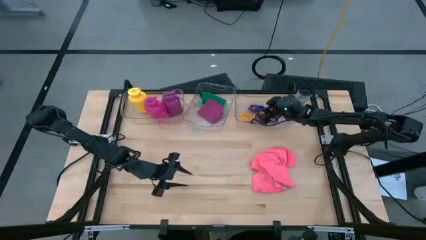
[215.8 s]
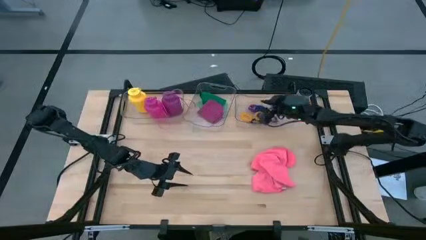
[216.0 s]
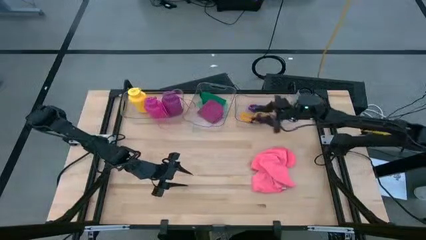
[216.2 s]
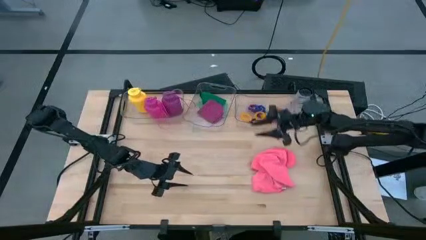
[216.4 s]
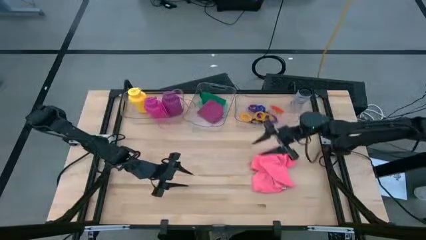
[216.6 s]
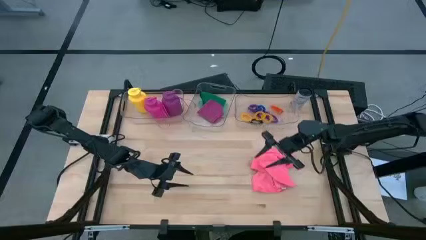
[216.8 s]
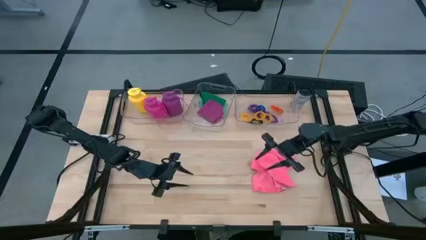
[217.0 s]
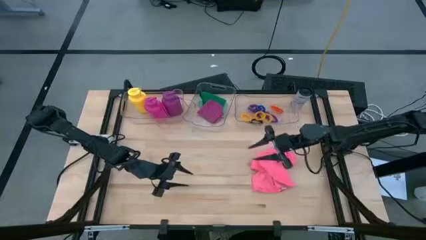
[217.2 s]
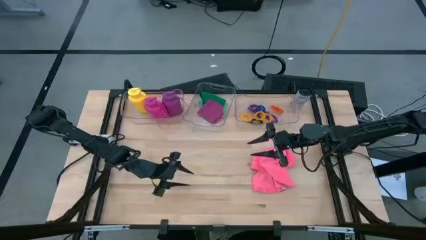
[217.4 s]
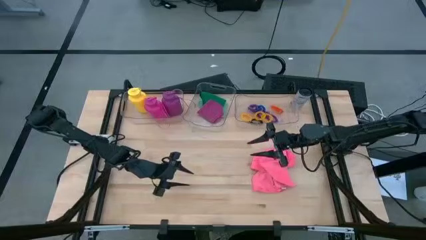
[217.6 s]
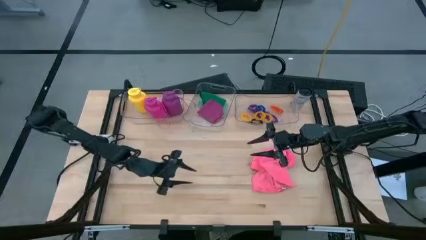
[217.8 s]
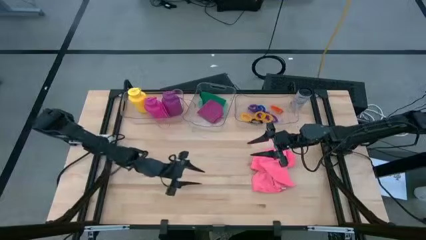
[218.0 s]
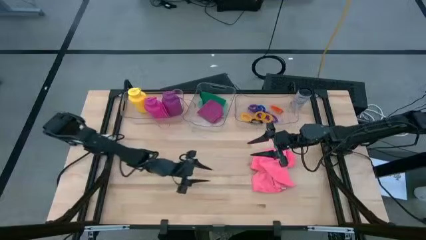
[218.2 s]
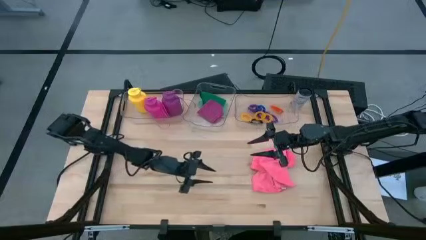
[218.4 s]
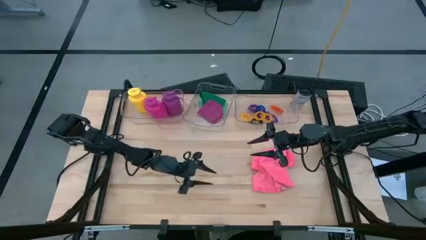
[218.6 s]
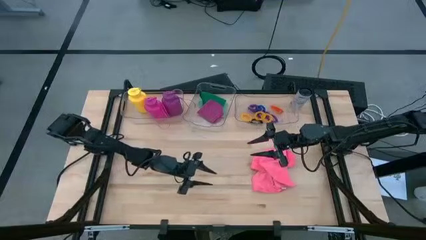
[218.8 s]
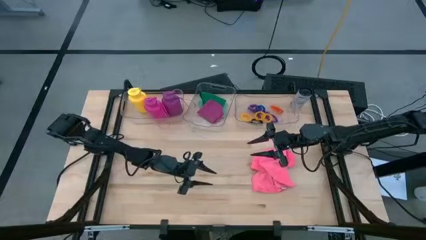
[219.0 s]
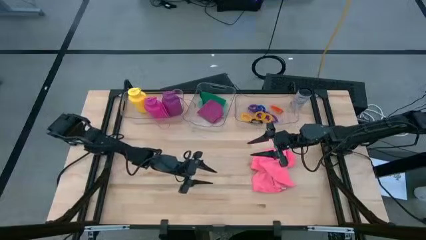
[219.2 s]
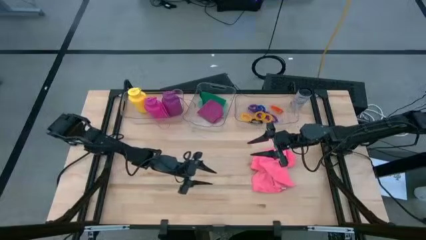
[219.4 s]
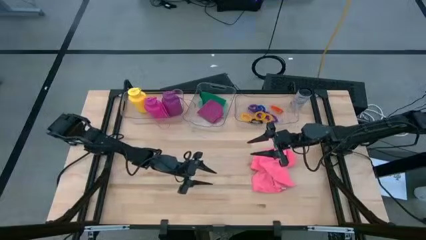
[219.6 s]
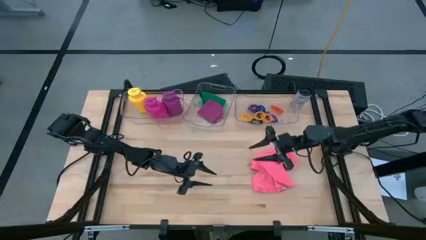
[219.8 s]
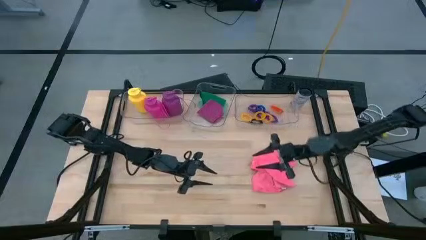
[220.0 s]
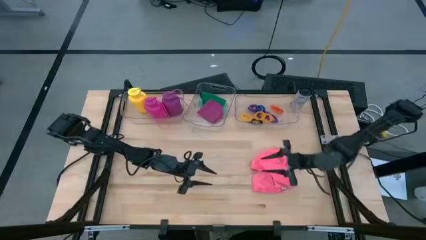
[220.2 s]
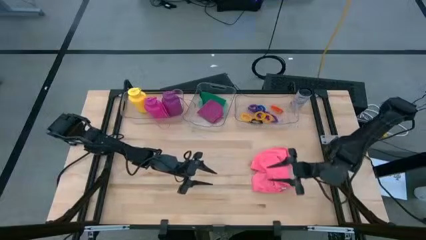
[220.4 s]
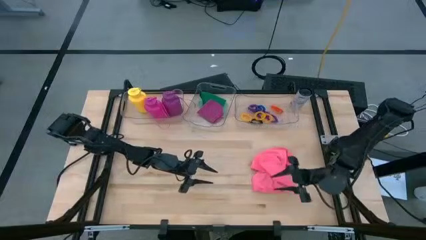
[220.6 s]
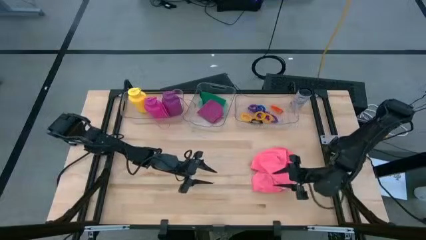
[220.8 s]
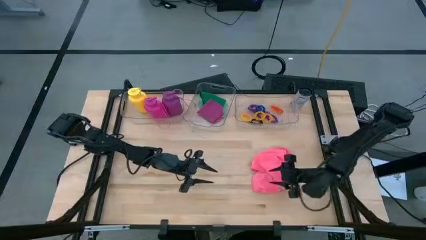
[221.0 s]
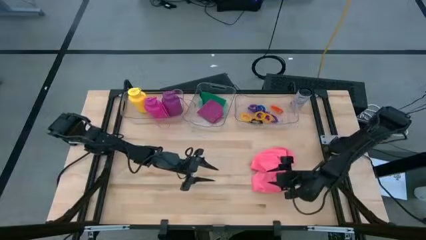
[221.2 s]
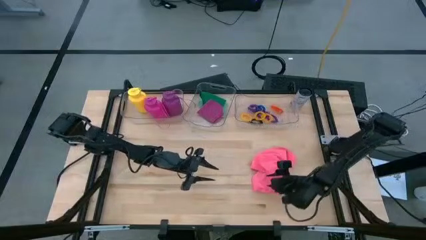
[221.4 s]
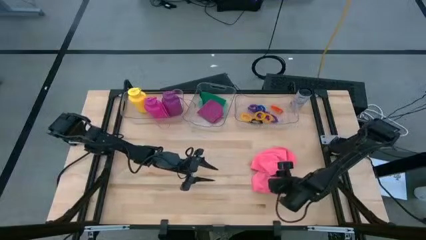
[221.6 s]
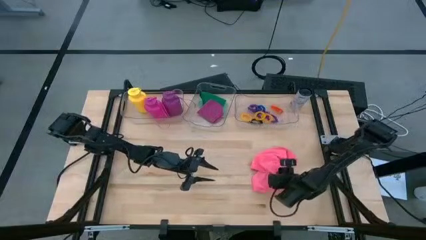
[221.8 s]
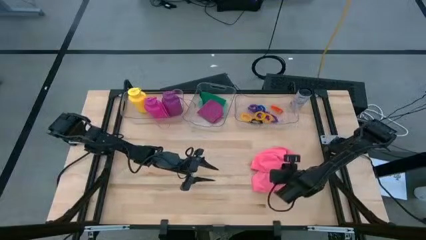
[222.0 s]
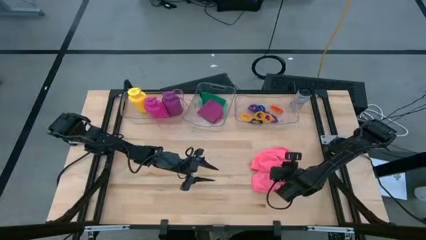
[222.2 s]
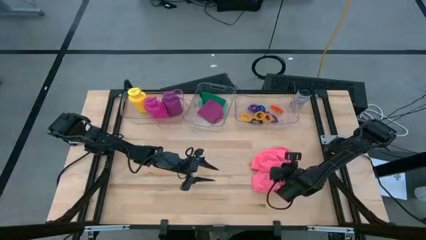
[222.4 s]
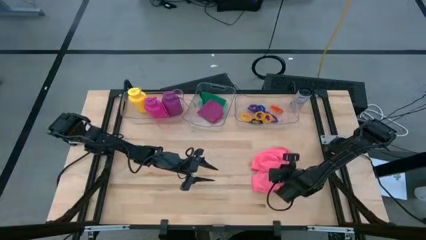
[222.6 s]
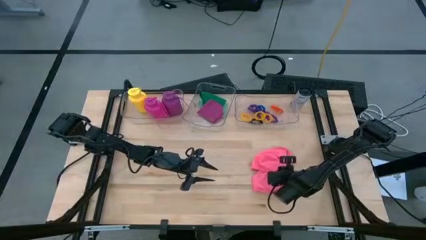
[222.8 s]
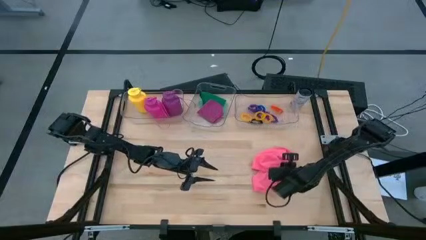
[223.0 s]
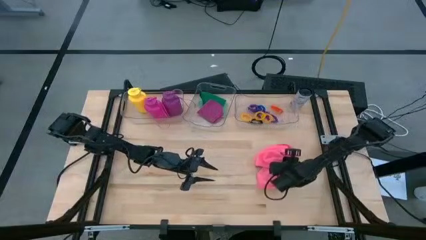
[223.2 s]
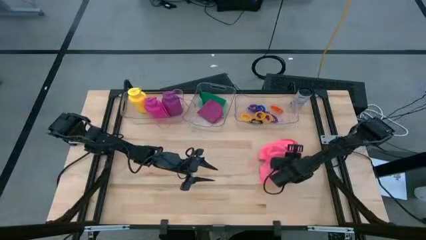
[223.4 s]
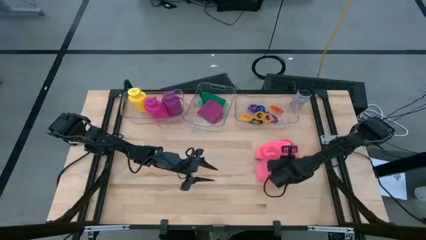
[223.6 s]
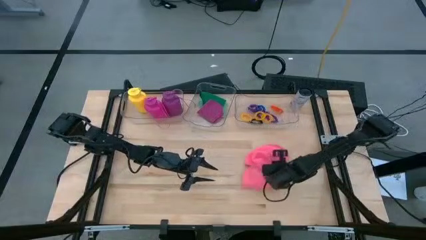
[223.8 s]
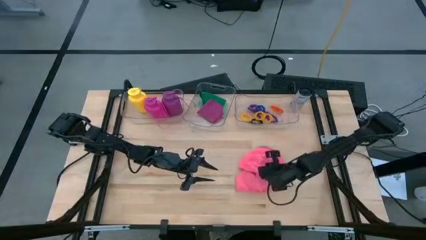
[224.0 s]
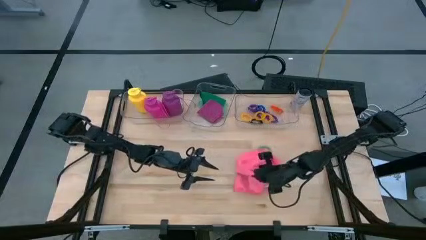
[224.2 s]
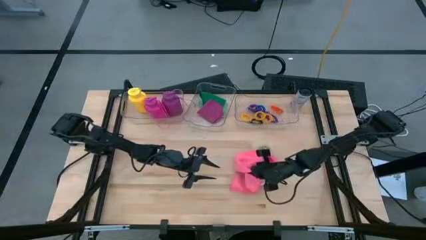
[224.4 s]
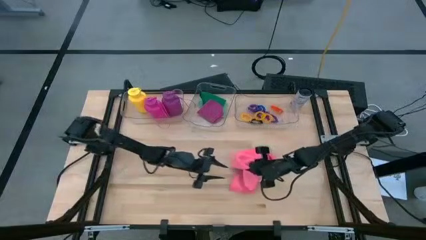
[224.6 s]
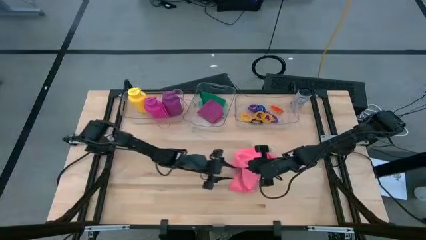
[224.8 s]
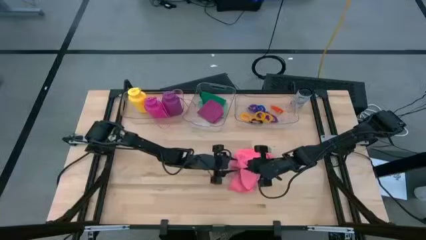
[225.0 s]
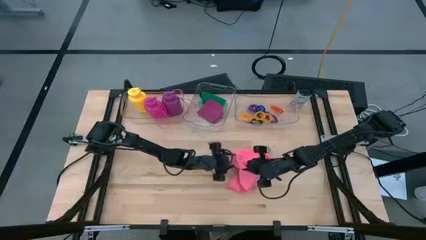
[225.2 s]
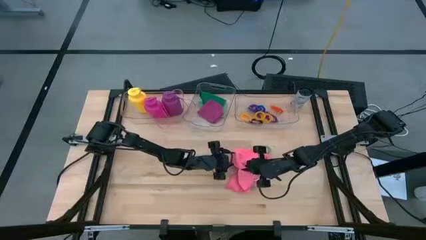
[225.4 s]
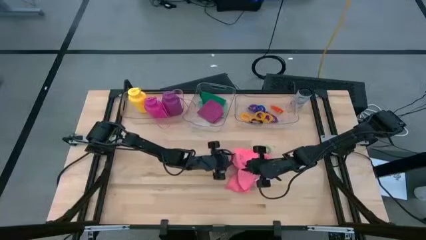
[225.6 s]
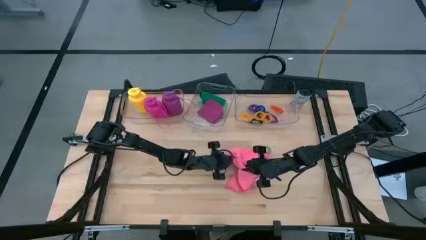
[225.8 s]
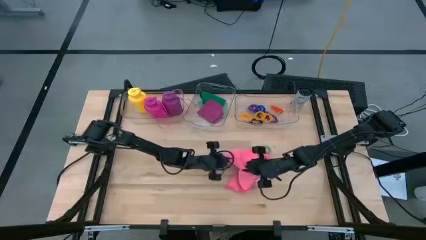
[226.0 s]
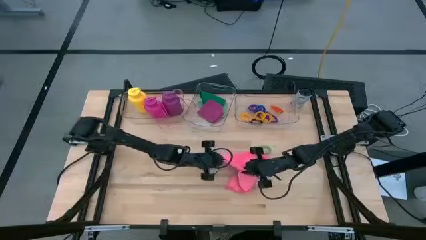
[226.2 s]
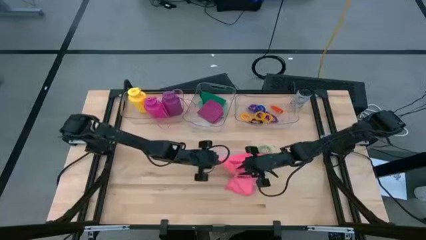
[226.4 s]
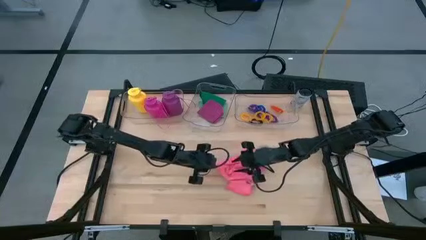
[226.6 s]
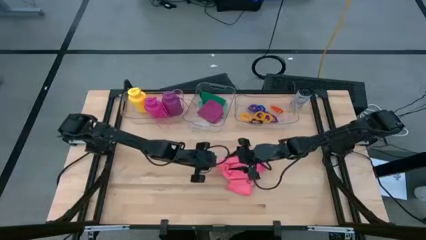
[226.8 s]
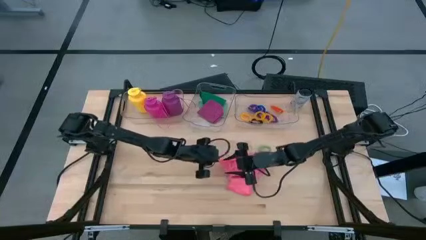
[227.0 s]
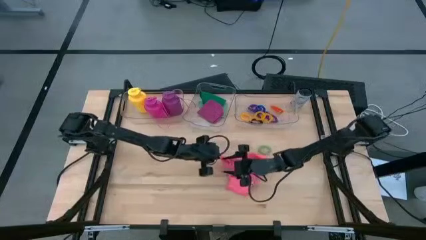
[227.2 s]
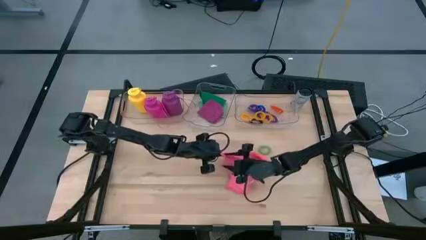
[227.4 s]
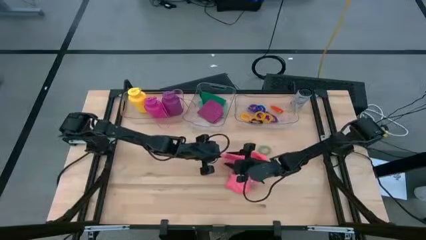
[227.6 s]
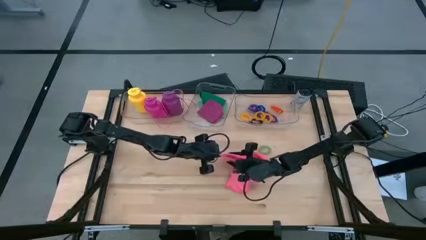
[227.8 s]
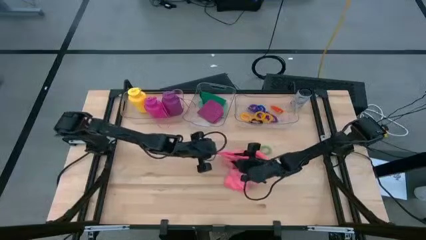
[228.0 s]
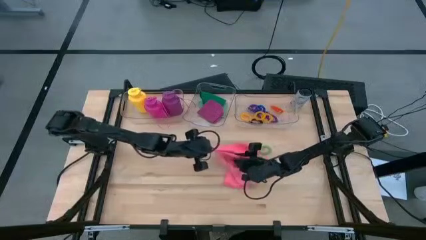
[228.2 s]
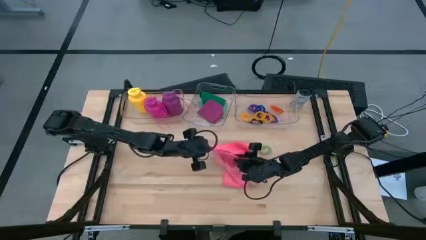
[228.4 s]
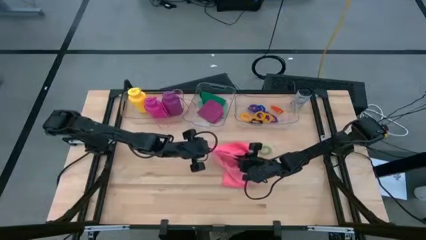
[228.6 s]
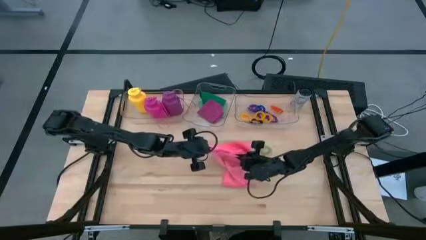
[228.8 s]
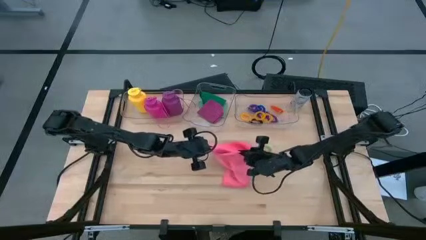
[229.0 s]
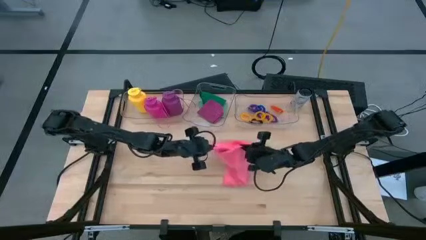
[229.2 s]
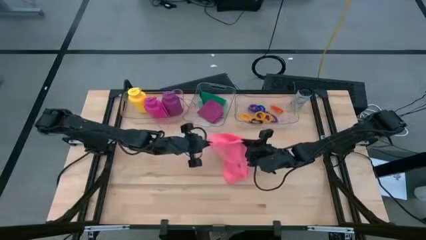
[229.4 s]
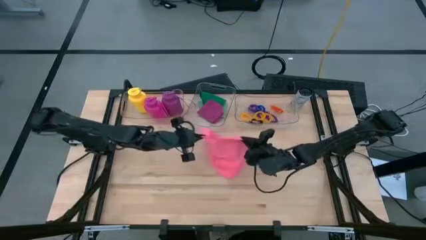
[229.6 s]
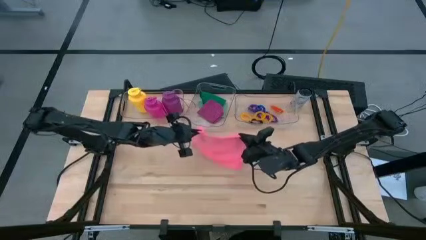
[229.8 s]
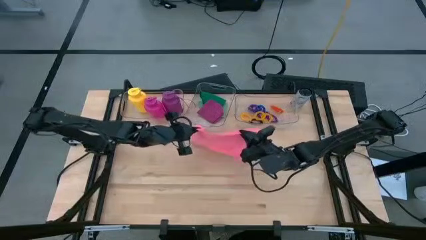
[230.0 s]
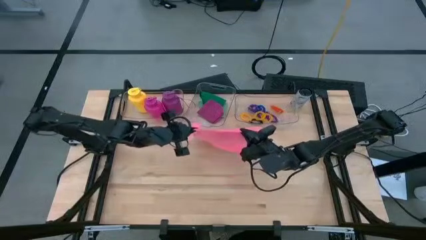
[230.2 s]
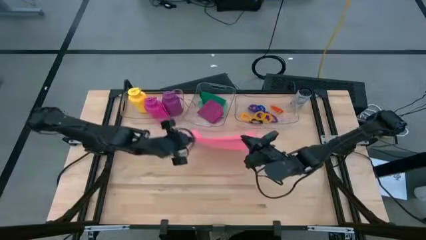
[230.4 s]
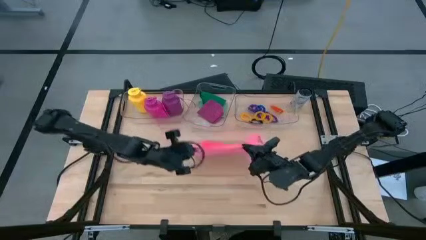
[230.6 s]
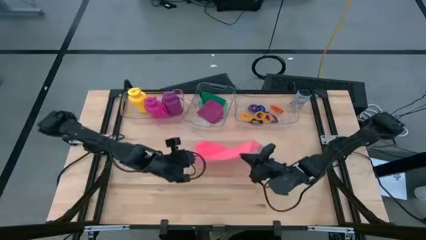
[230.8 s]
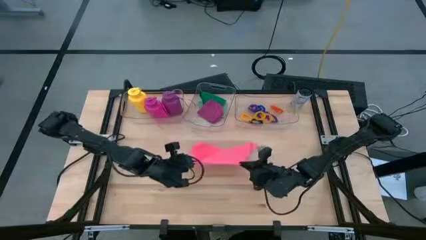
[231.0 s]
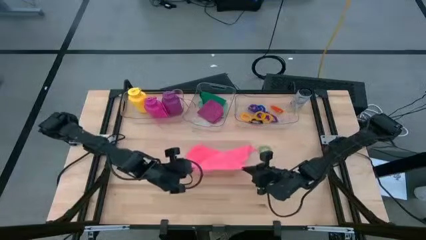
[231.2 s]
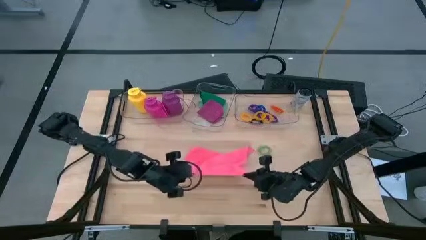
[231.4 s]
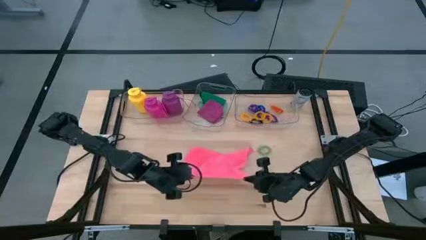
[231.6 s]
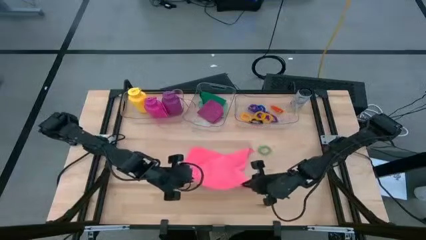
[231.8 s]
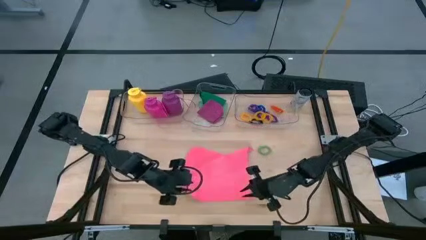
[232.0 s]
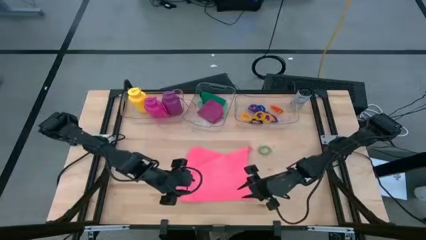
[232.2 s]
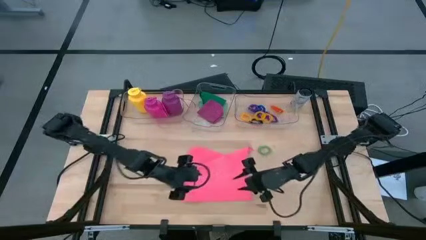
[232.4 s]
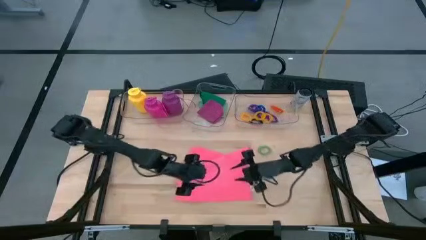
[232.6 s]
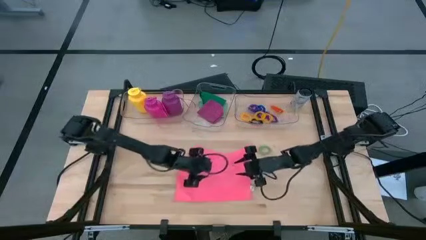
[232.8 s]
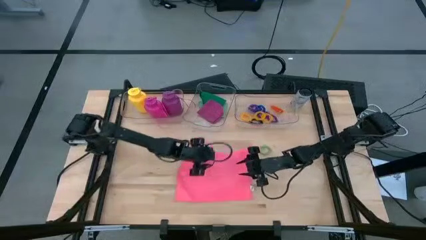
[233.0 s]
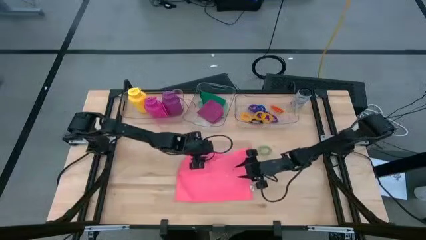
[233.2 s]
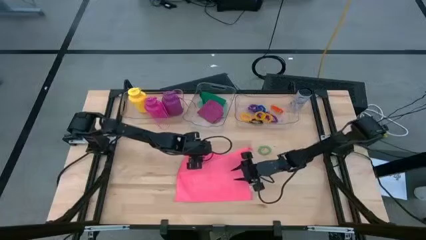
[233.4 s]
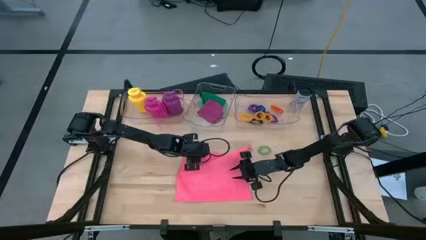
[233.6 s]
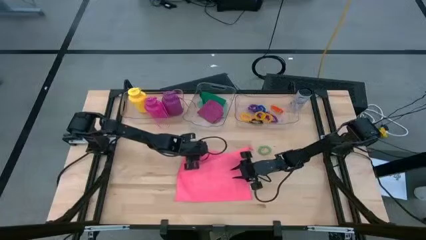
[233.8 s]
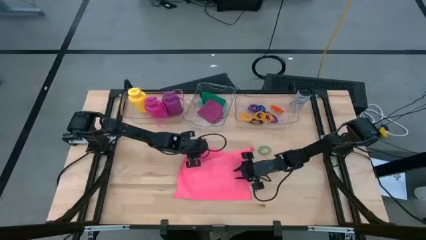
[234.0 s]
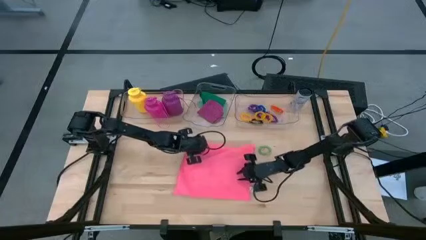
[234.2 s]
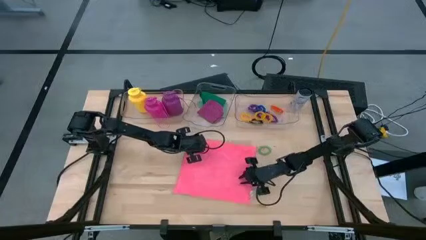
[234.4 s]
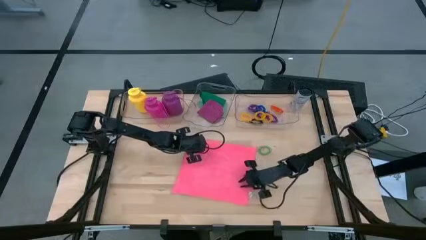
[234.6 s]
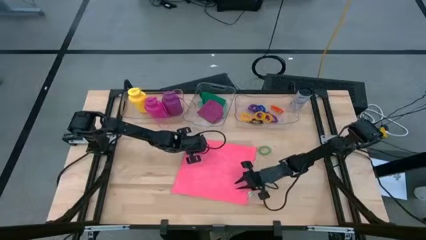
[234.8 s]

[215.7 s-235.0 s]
Task: Pick & Place Sports Items
Adjust the pink microfiber towel
